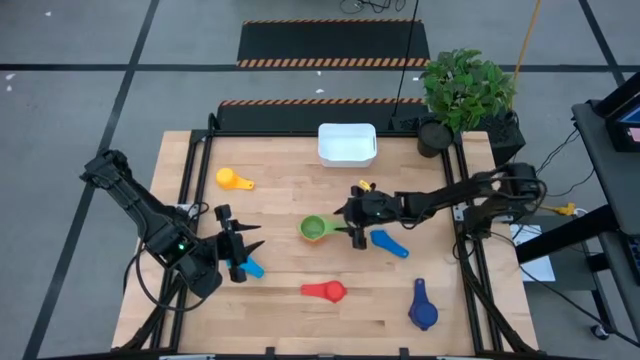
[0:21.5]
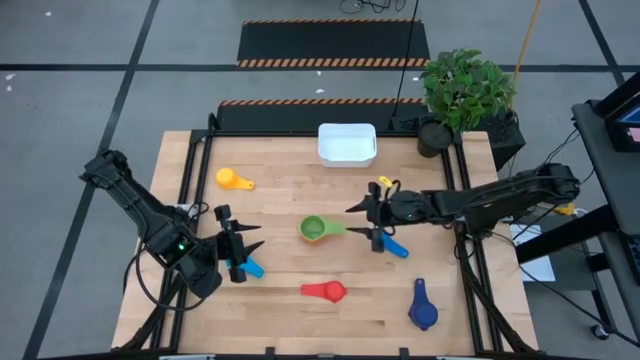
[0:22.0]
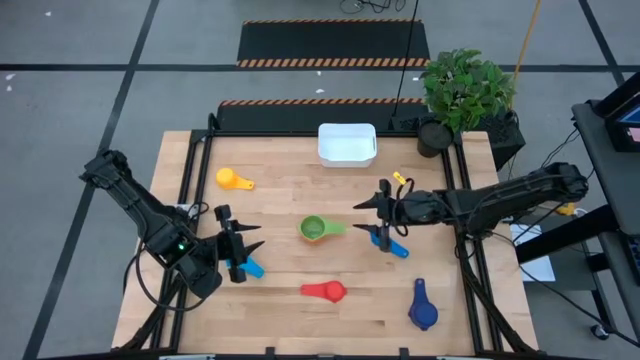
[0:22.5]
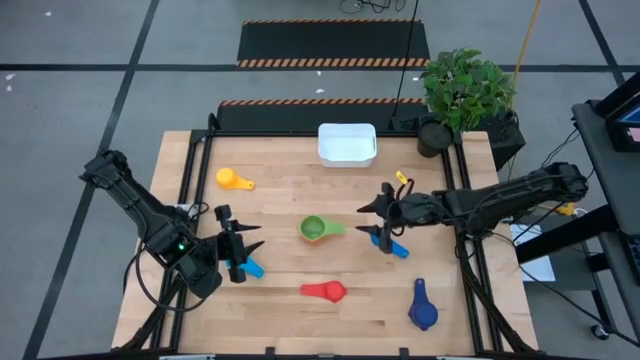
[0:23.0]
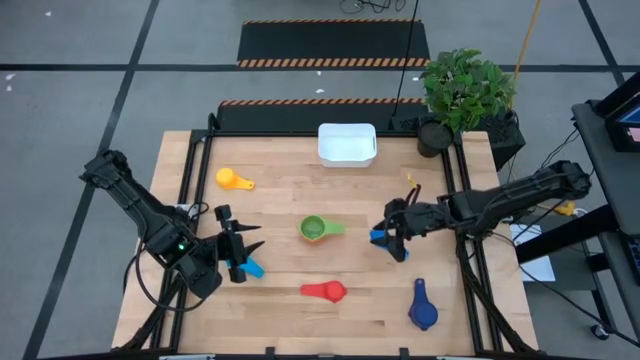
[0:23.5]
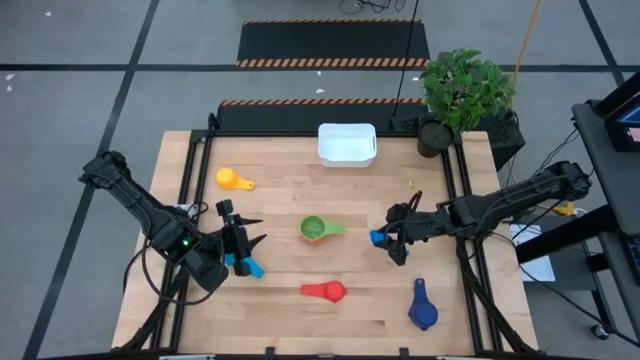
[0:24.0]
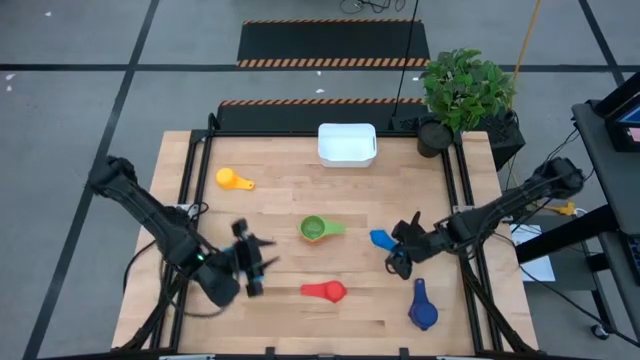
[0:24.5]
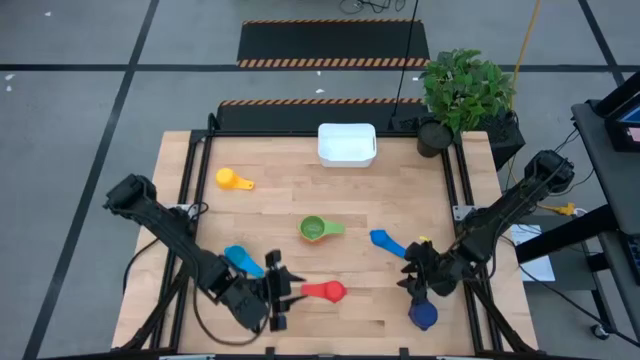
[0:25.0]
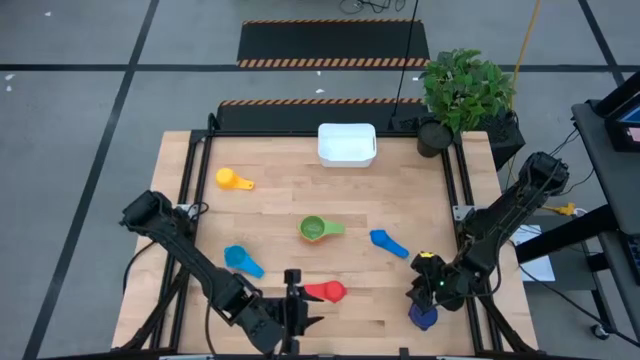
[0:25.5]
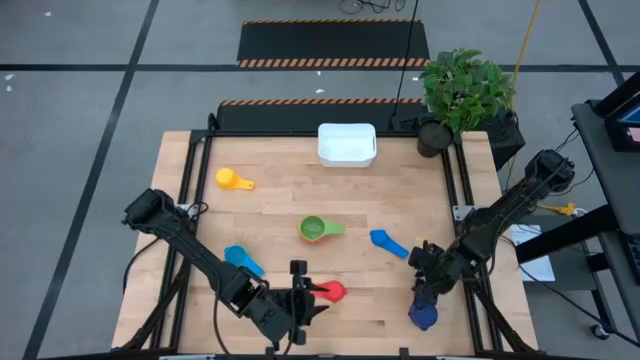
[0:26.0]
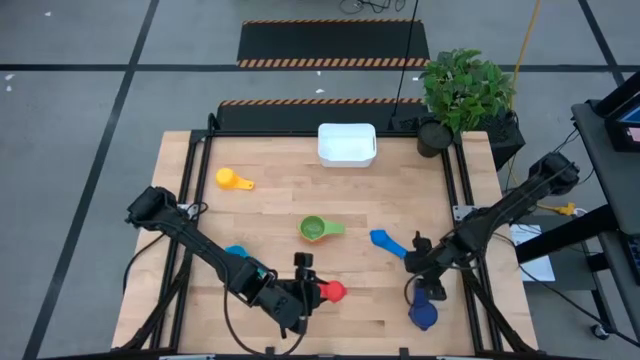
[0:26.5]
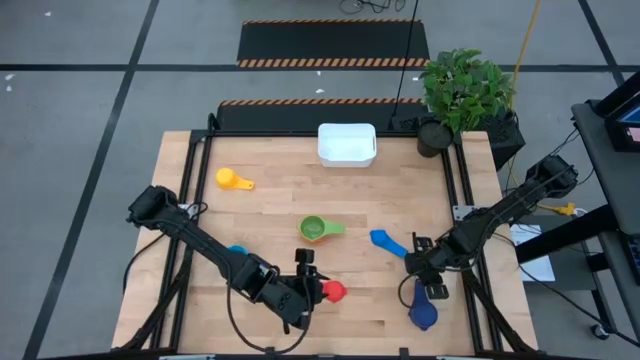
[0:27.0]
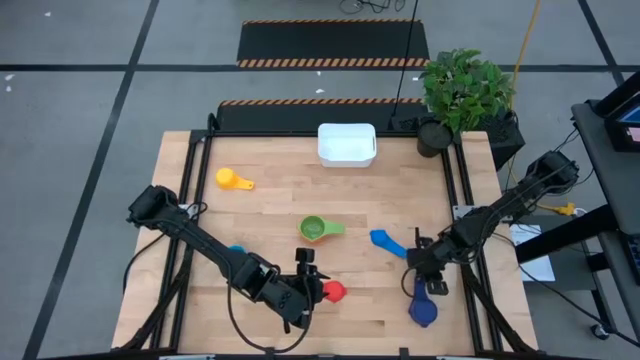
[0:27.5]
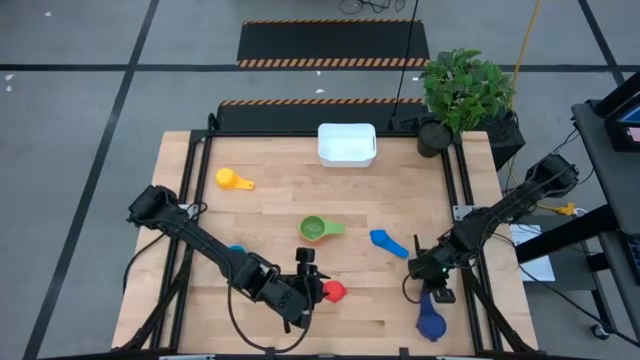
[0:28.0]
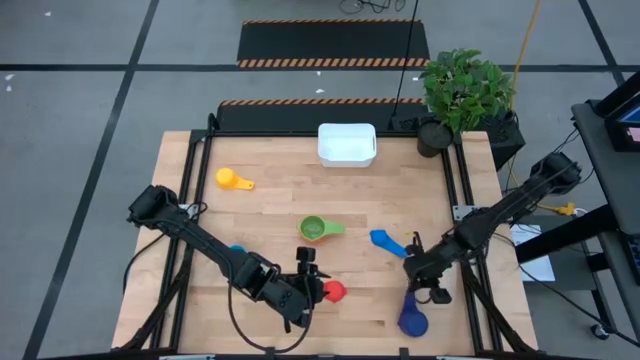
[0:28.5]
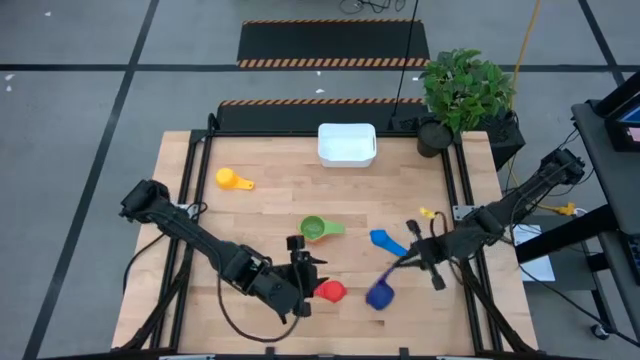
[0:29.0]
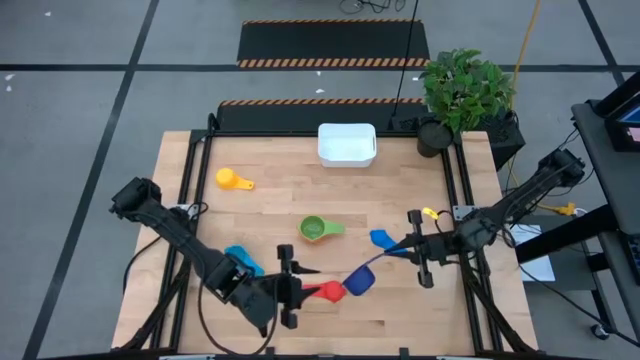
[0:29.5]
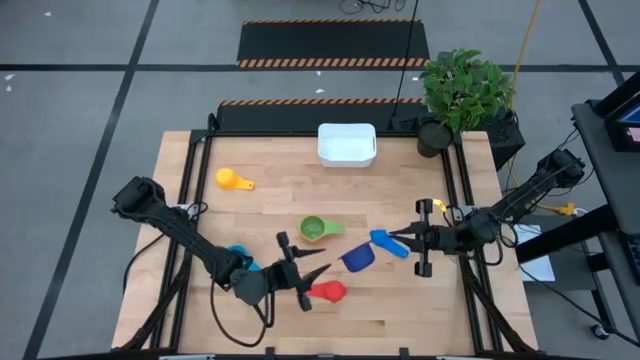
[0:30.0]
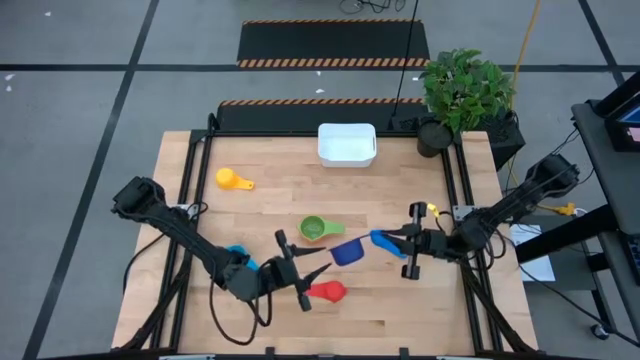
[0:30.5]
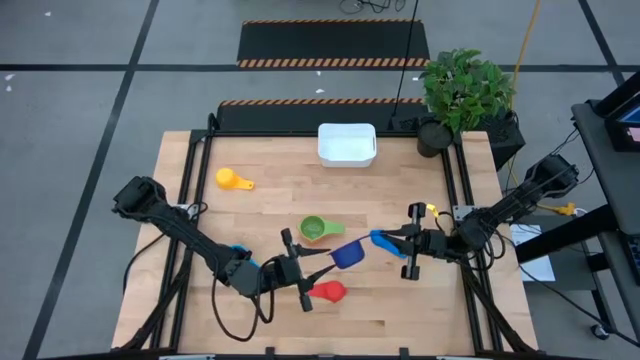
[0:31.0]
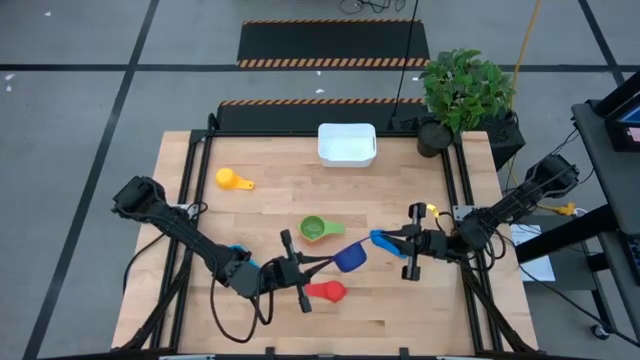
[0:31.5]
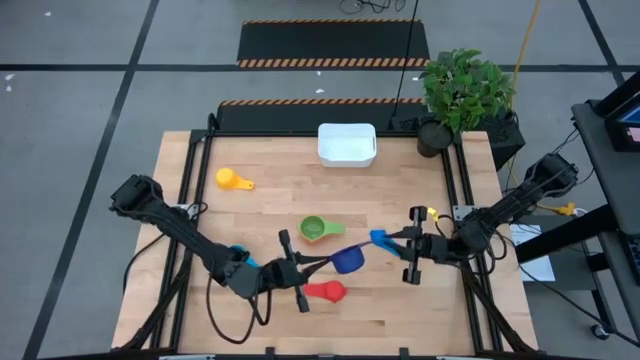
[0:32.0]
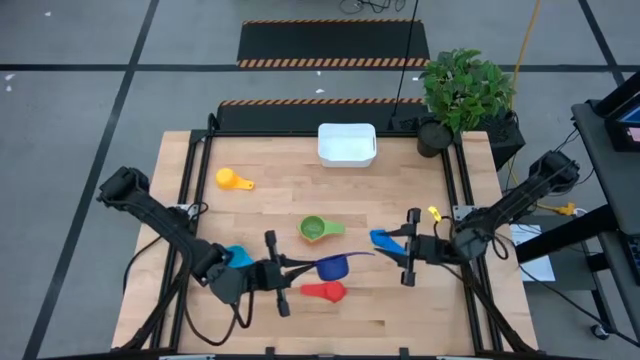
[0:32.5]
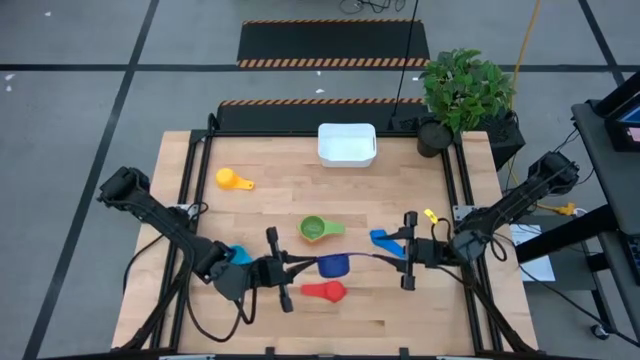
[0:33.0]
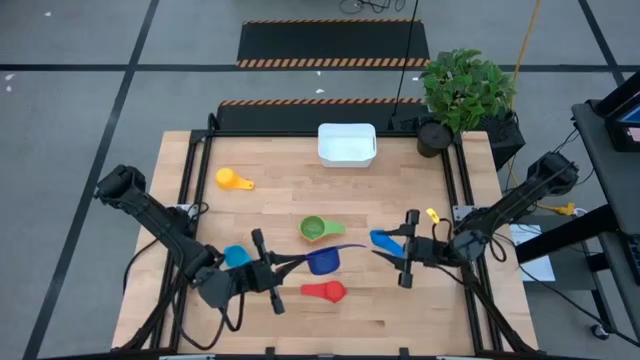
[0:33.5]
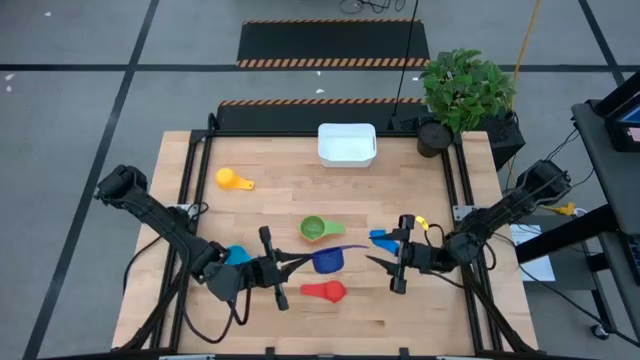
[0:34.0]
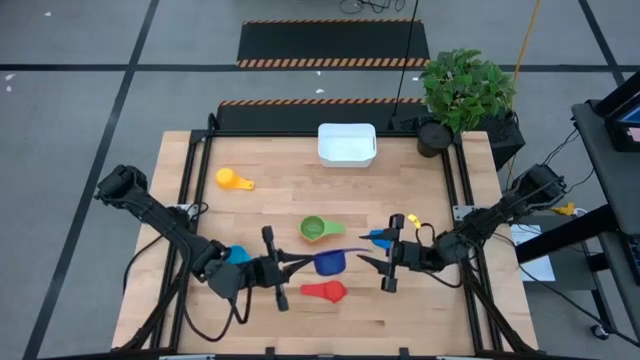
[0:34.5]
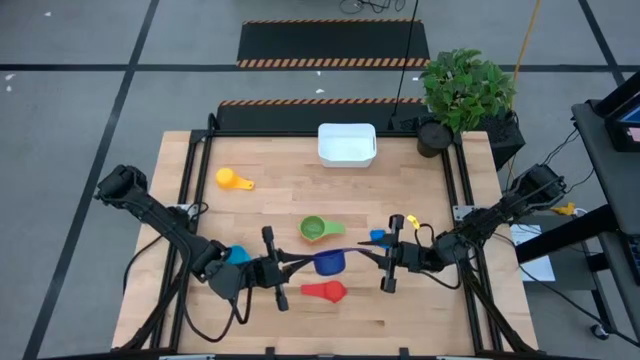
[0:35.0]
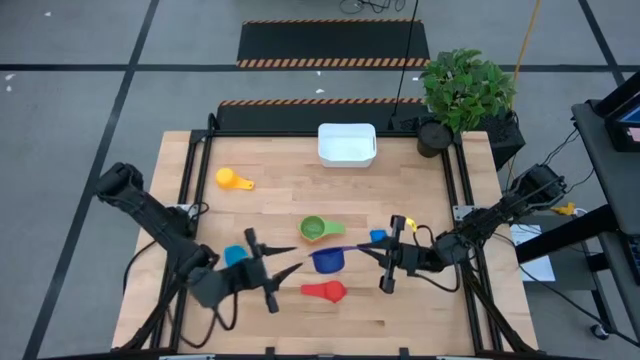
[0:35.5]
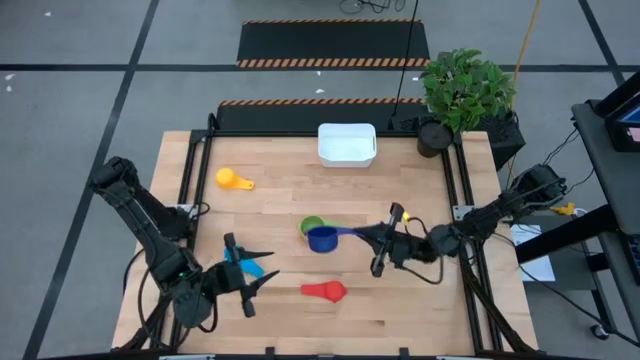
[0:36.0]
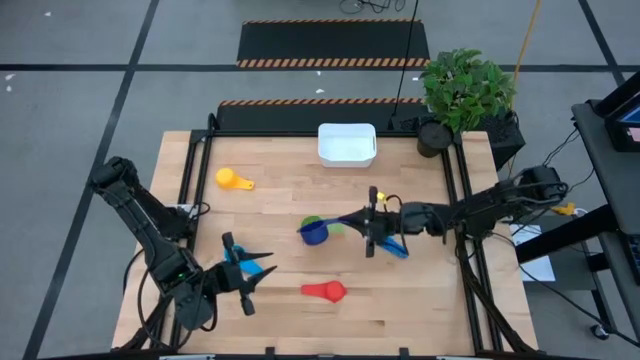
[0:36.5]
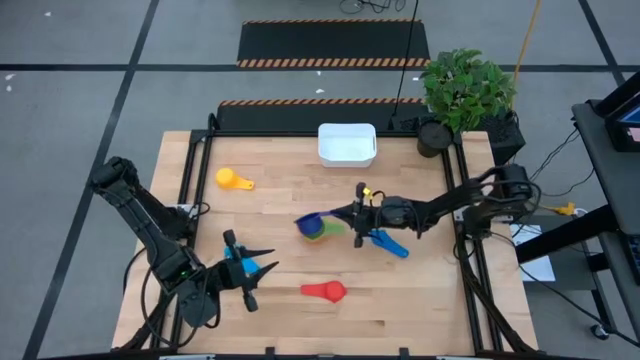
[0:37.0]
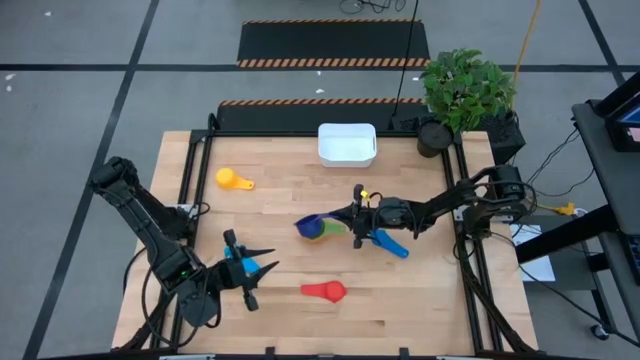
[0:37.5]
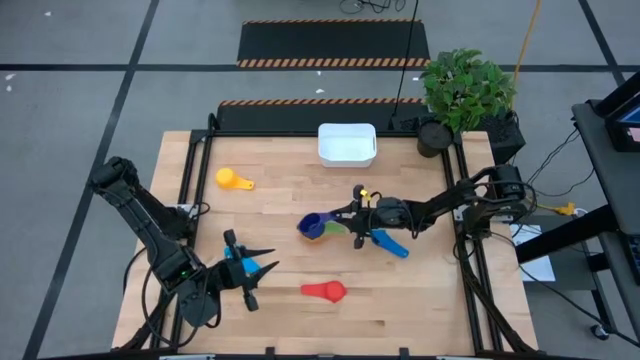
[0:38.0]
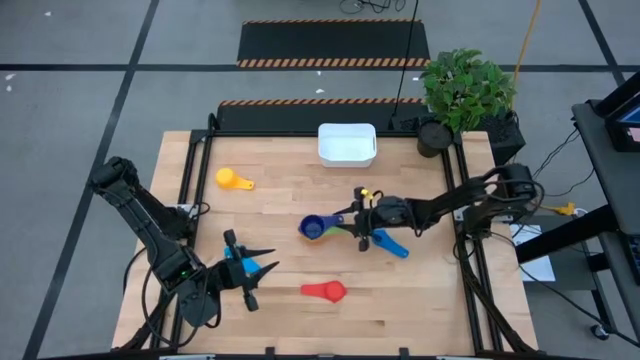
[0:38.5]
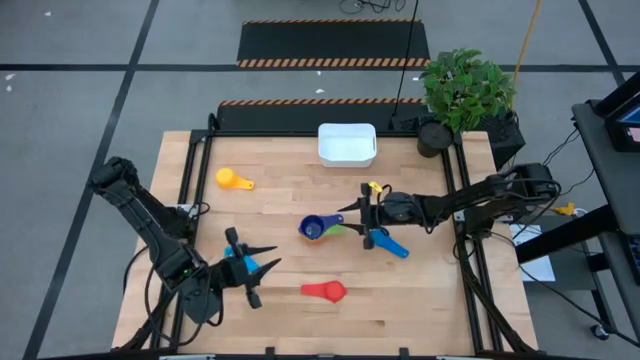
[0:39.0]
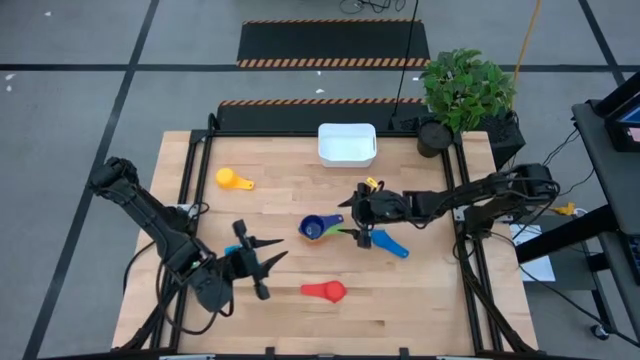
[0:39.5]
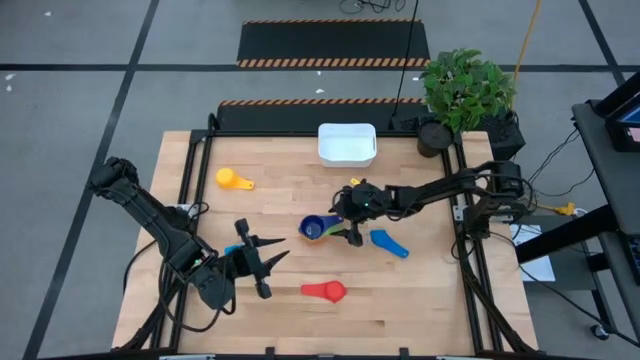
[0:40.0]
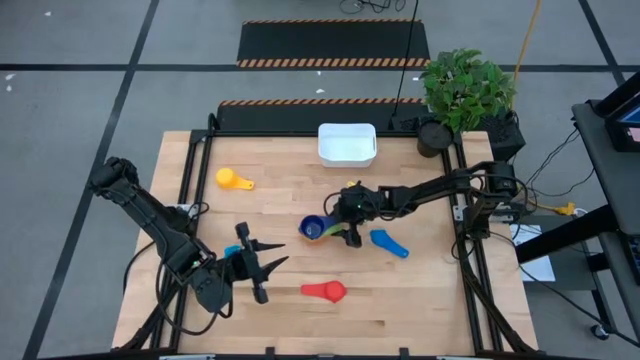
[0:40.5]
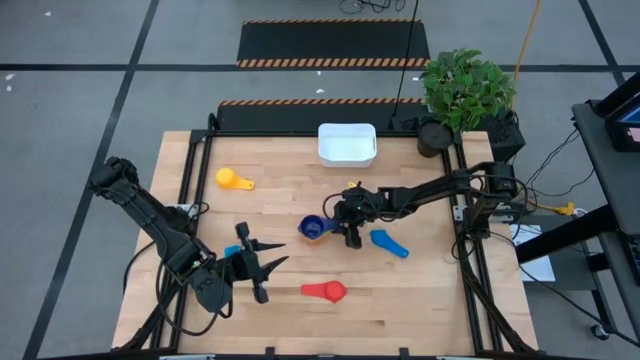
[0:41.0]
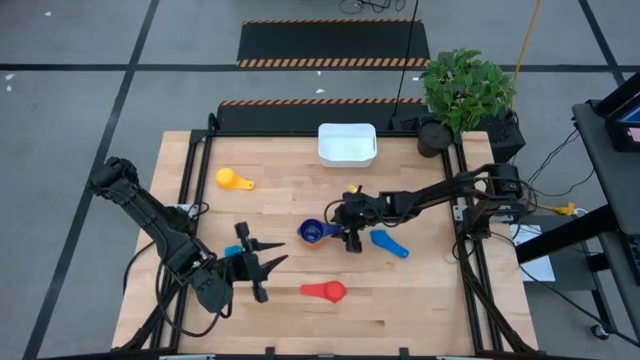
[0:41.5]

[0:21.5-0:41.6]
Task: Nest measuring cups in basket
Stack the dark blue measuring cup into the green measuring cup
